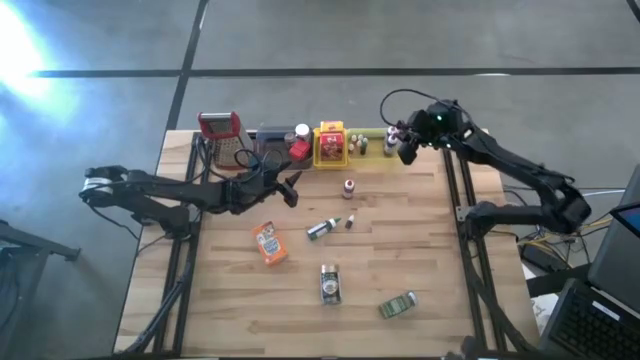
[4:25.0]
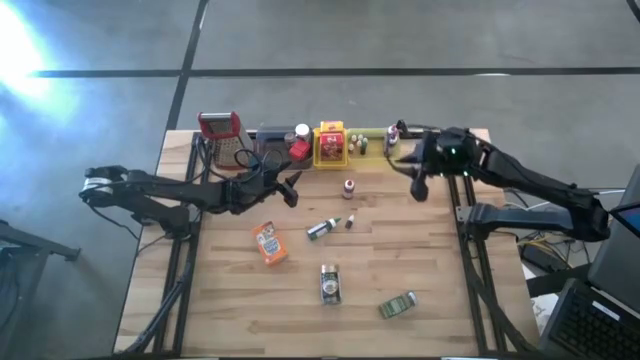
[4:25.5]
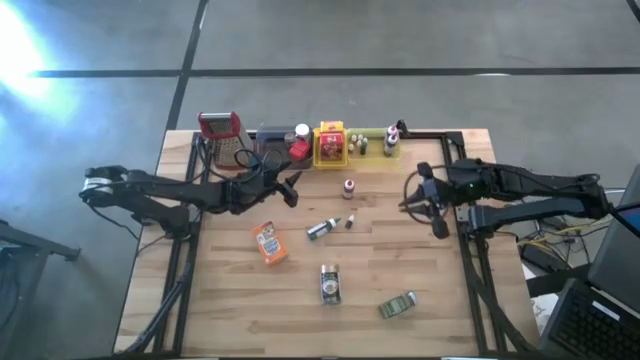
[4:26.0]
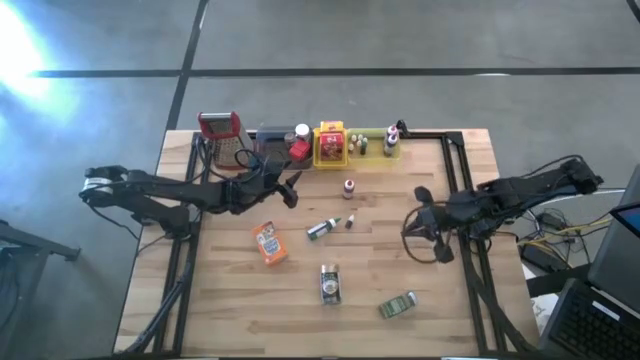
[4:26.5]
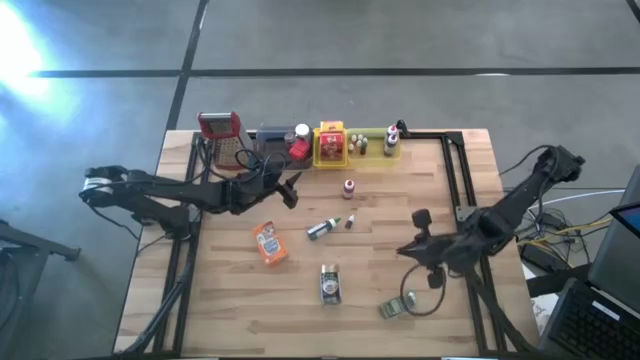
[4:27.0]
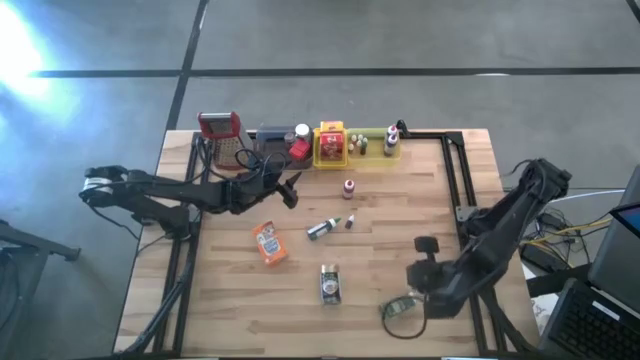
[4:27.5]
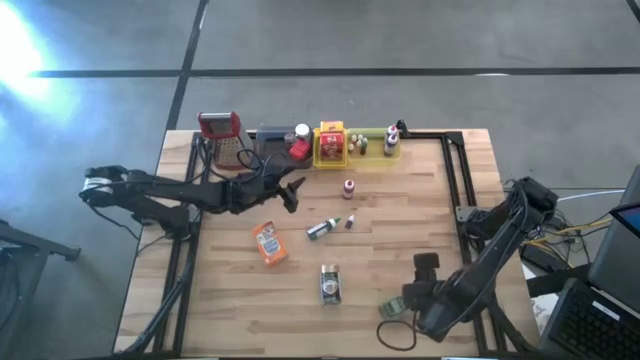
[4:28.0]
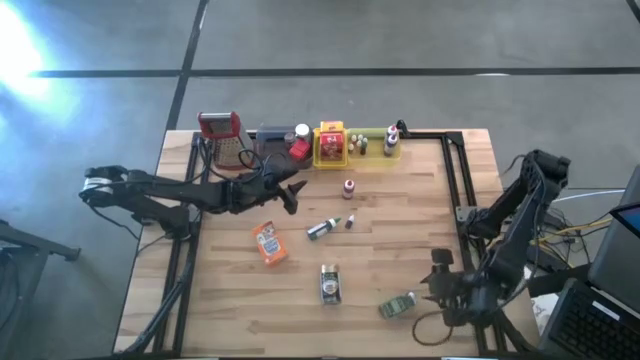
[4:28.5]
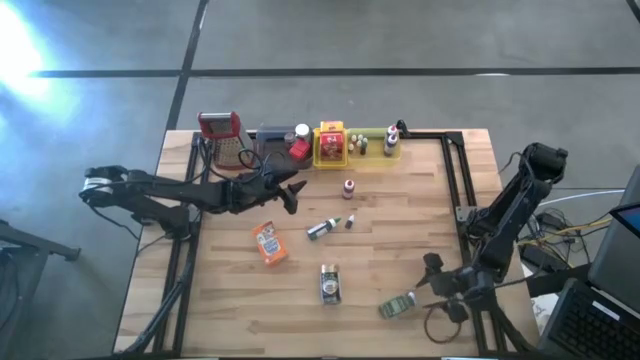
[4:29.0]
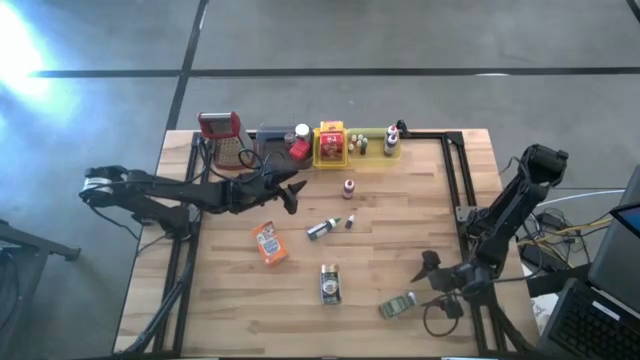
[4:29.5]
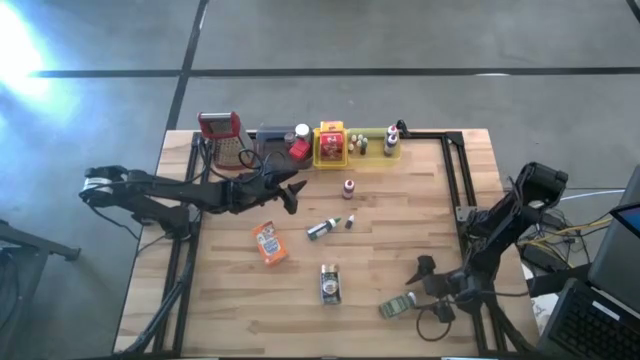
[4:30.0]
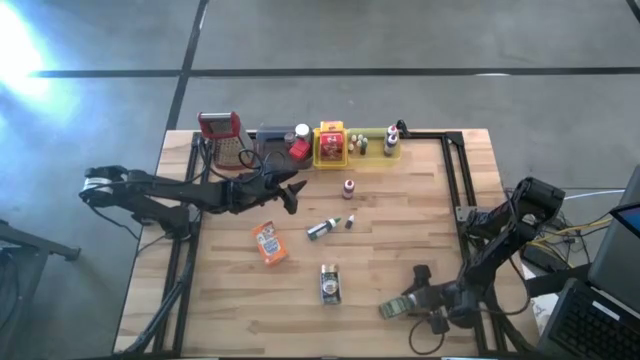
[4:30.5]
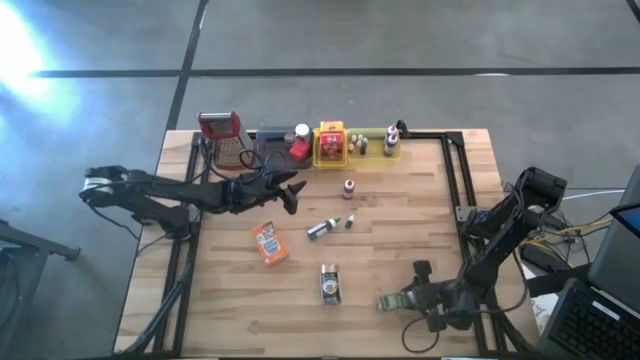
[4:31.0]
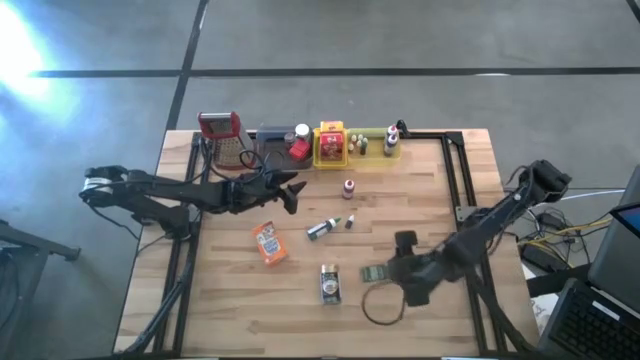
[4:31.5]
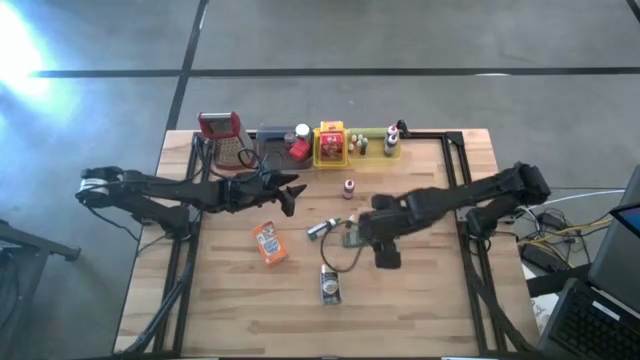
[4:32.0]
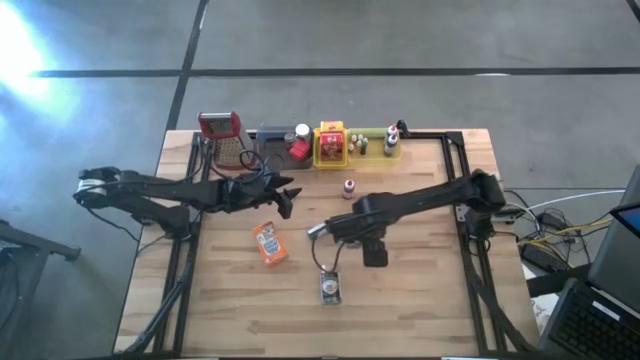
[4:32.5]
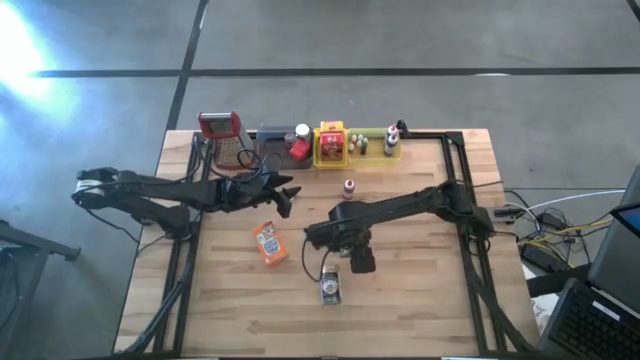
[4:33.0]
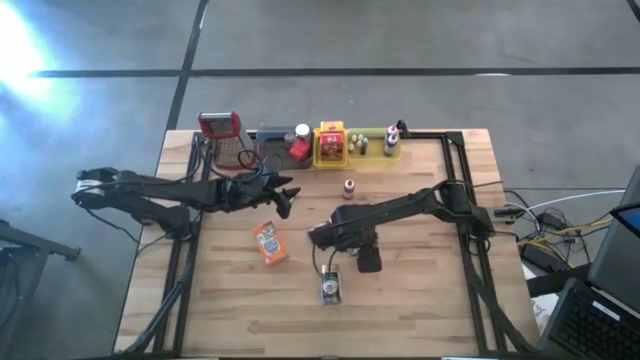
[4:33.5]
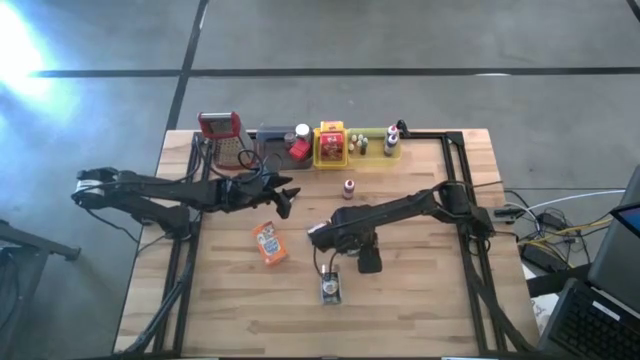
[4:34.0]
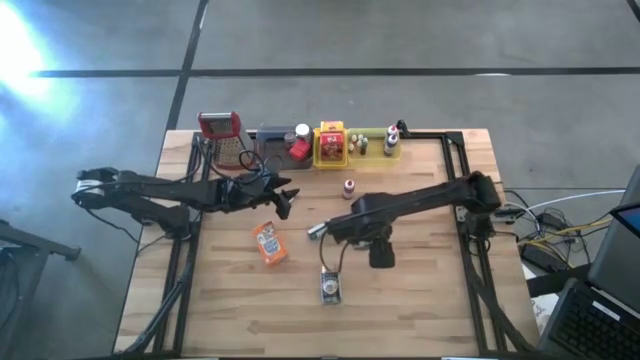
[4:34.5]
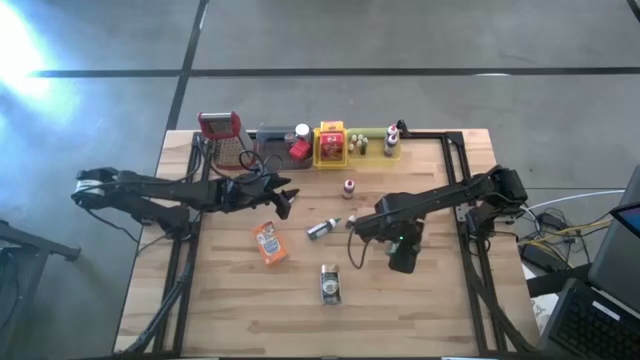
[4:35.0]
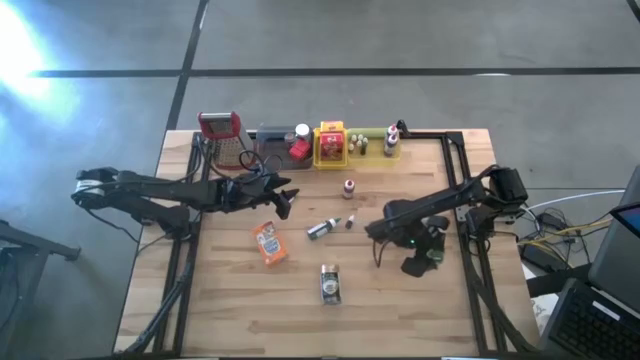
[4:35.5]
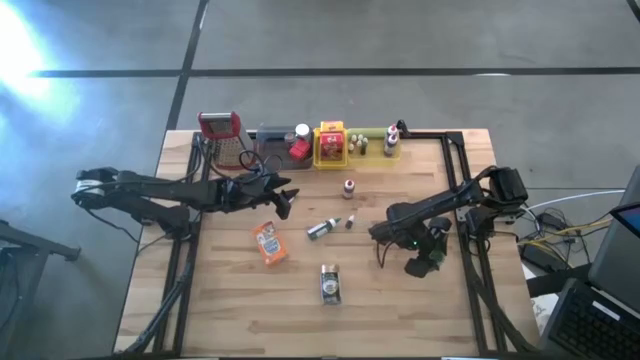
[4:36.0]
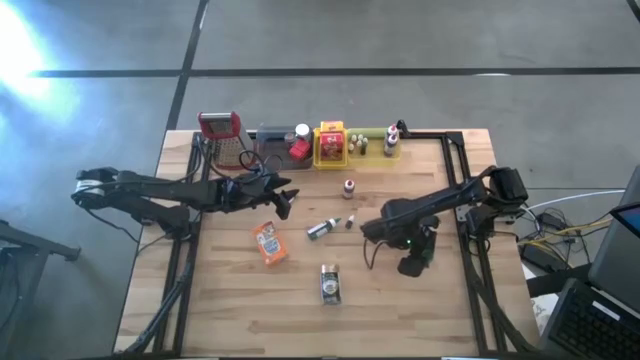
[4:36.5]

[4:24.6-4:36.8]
Task: Pick & Place Kitchen Items
Put the green seasoning bottle into the black bin

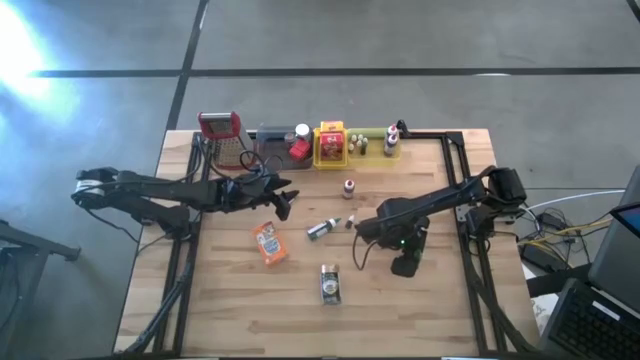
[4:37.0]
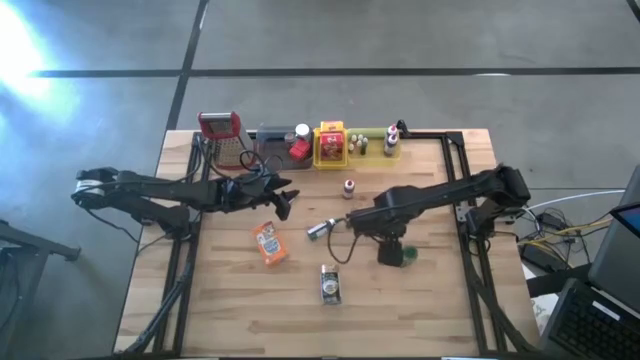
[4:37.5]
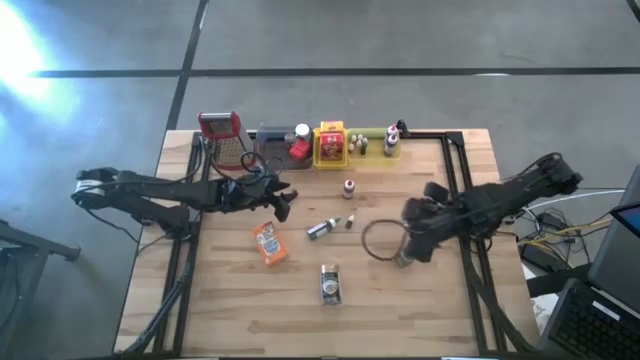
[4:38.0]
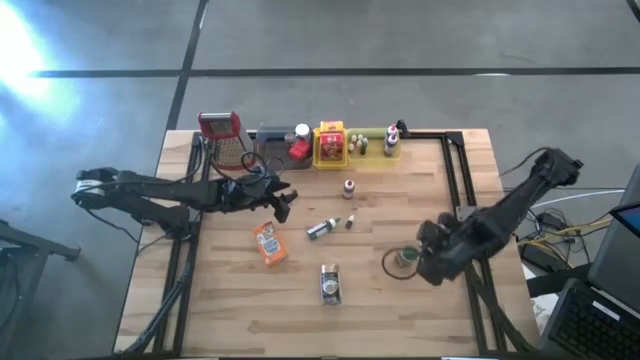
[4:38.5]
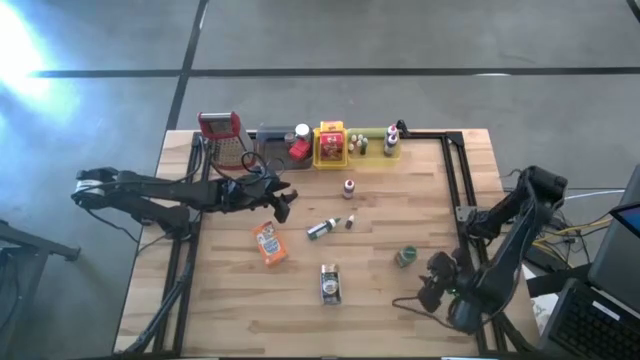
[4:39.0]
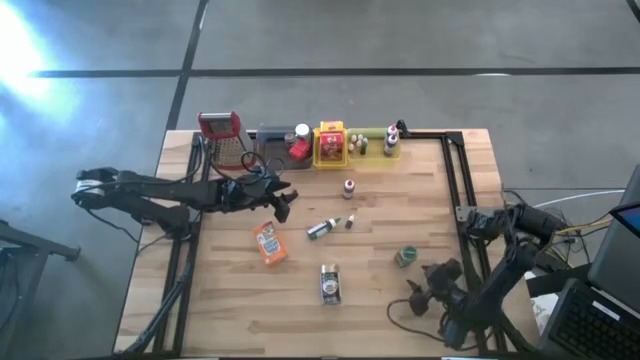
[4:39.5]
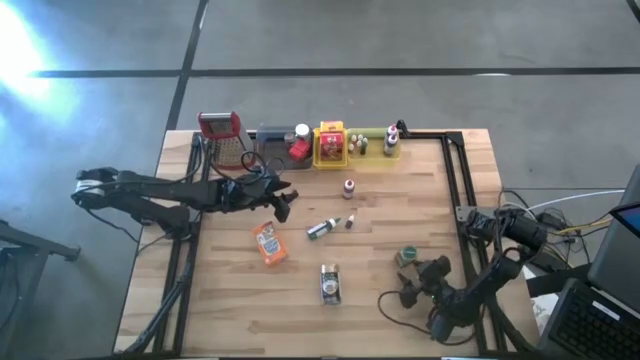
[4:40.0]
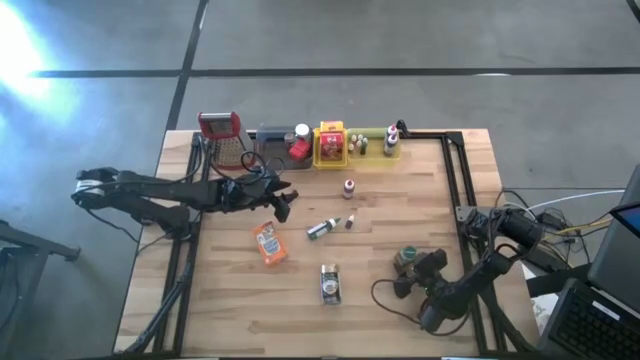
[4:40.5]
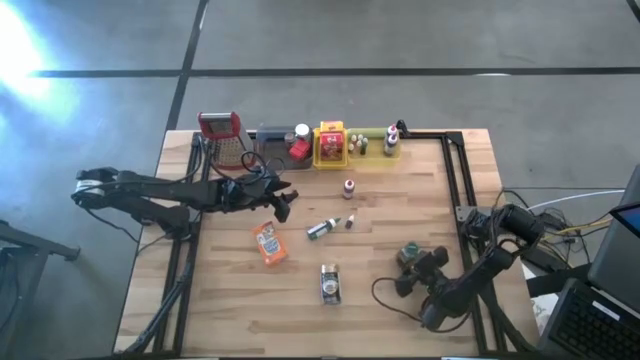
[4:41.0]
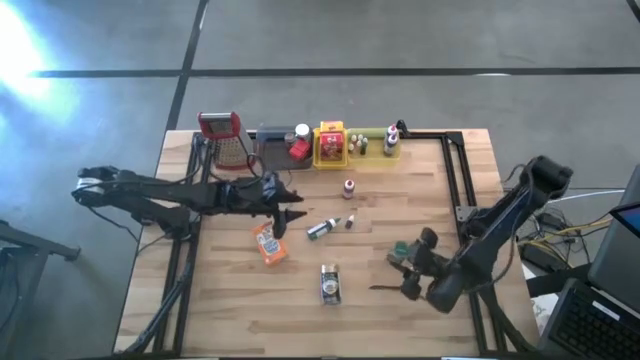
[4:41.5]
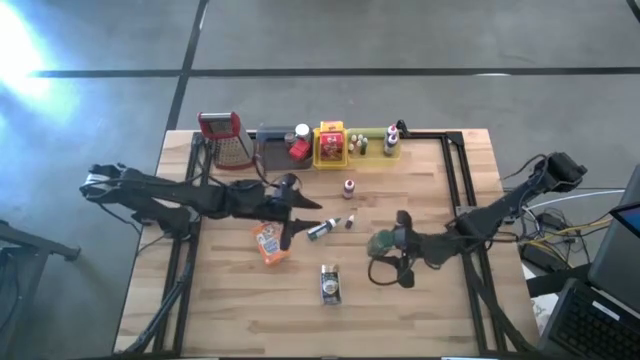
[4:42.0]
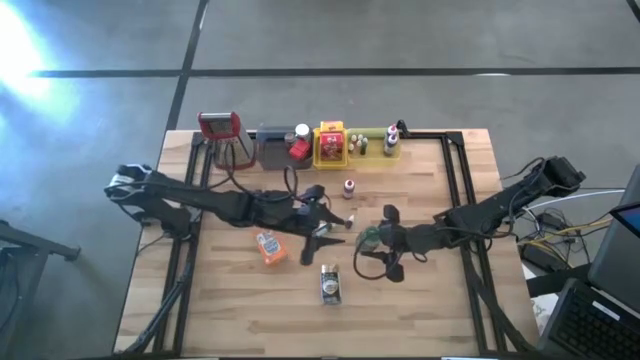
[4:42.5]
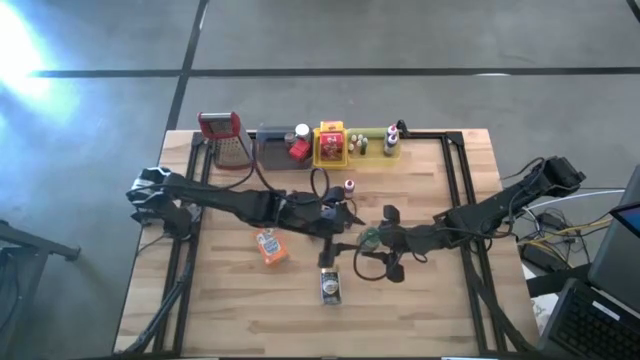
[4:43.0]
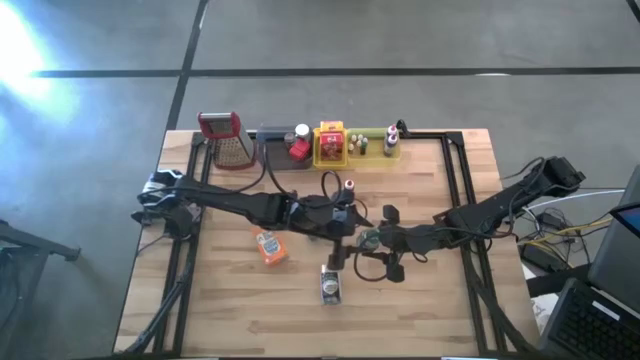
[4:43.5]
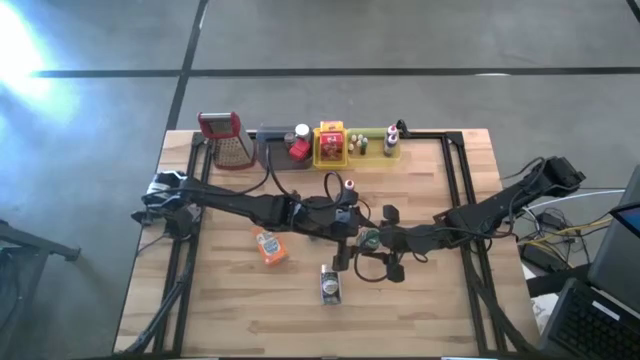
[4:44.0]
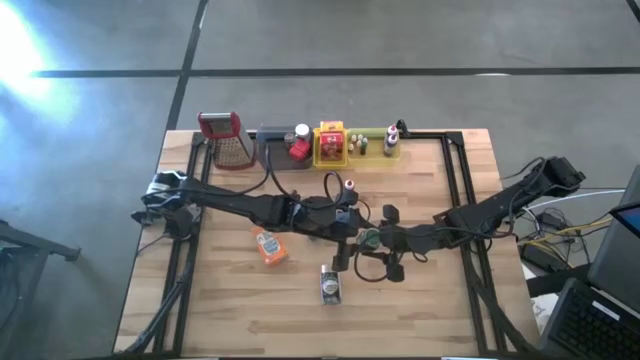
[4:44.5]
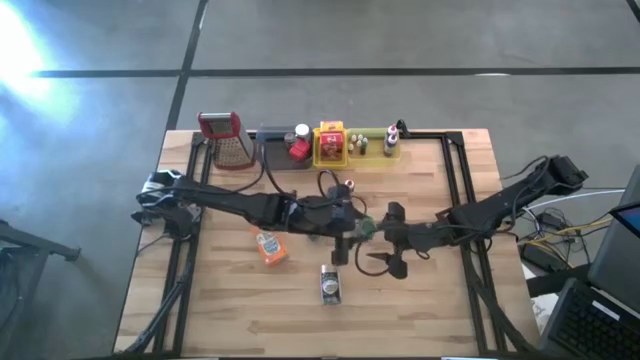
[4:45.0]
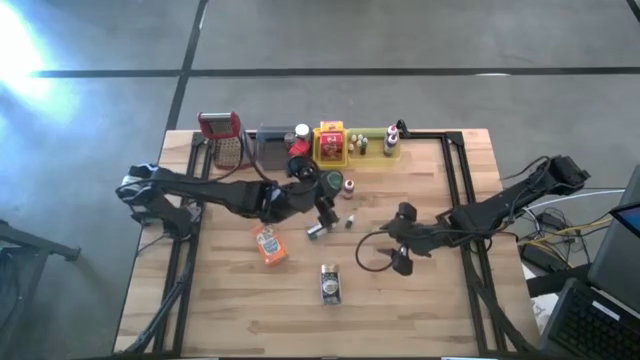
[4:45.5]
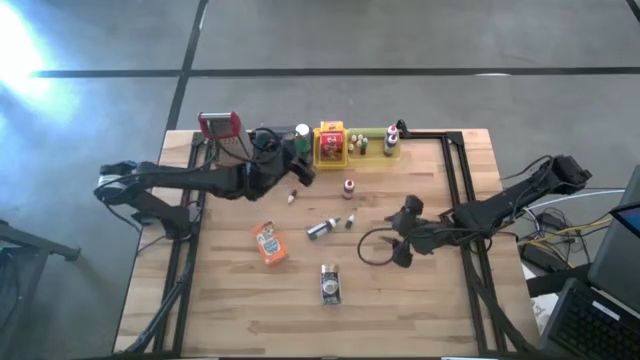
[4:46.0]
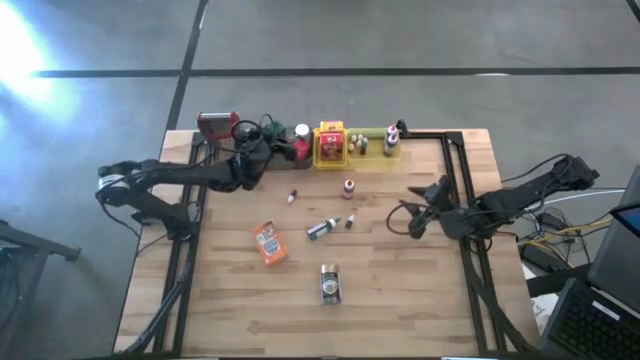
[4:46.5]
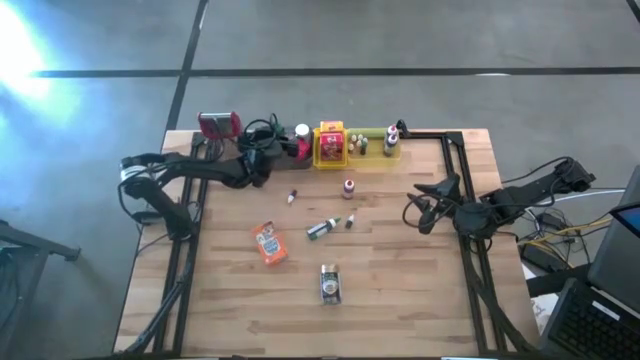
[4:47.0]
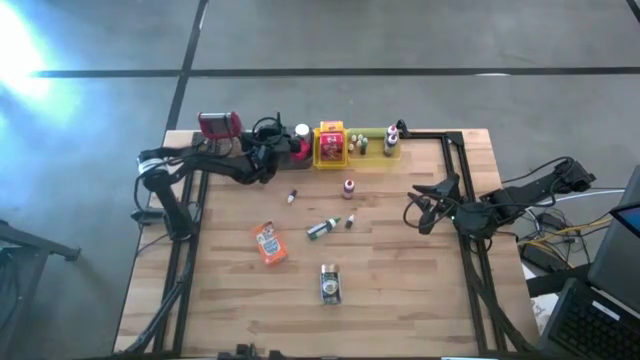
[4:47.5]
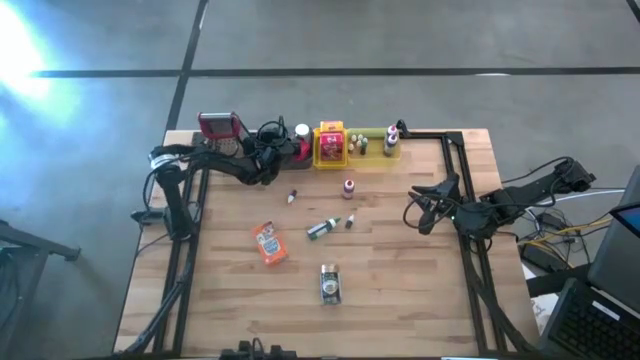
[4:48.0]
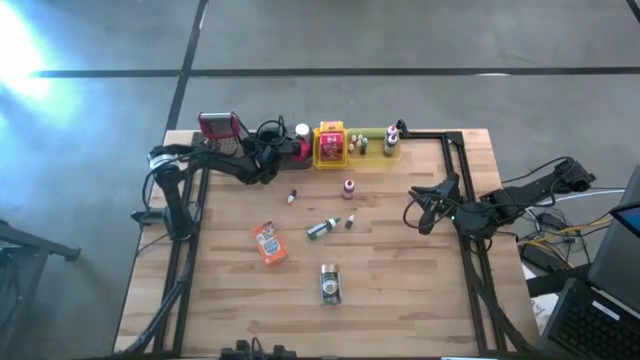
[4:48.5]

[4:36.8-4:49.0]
Put the green seasoning bottle into the black bin
